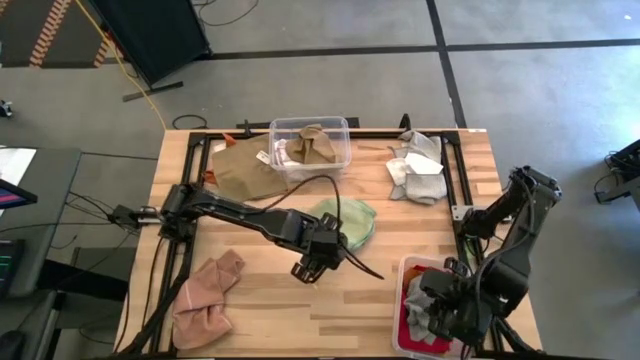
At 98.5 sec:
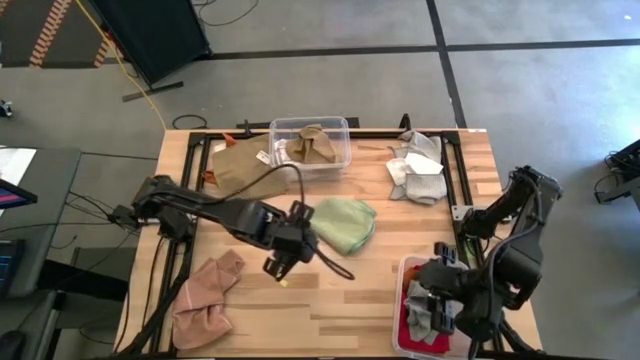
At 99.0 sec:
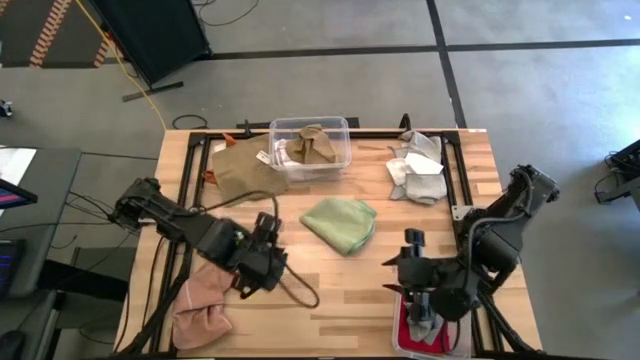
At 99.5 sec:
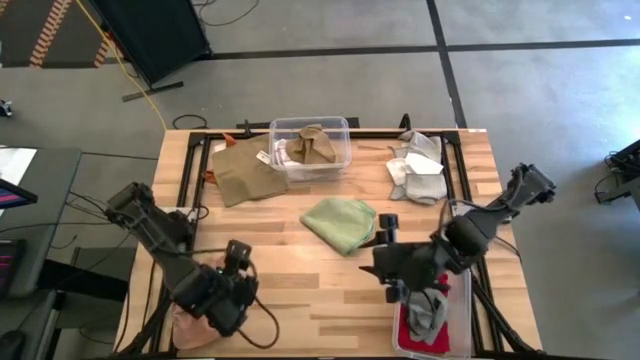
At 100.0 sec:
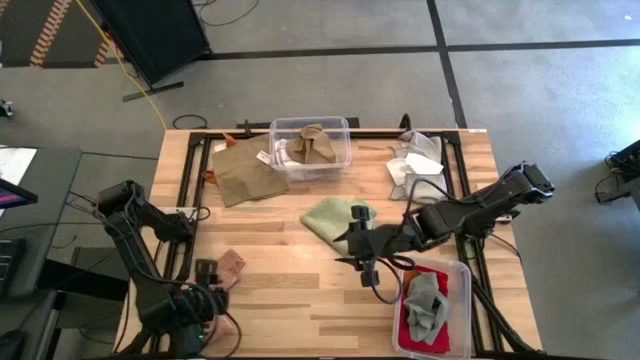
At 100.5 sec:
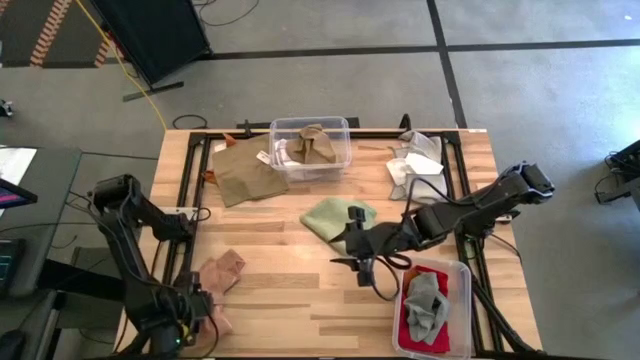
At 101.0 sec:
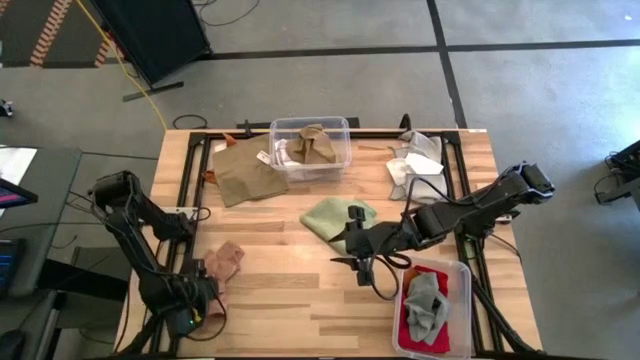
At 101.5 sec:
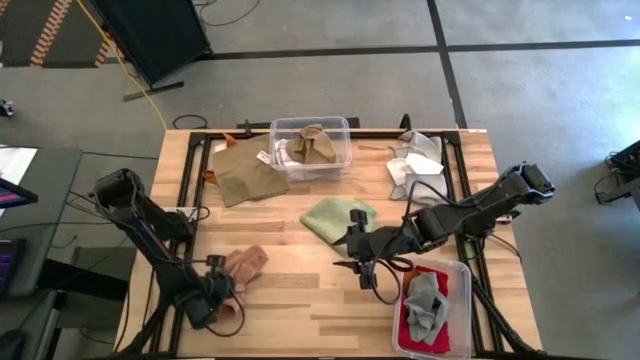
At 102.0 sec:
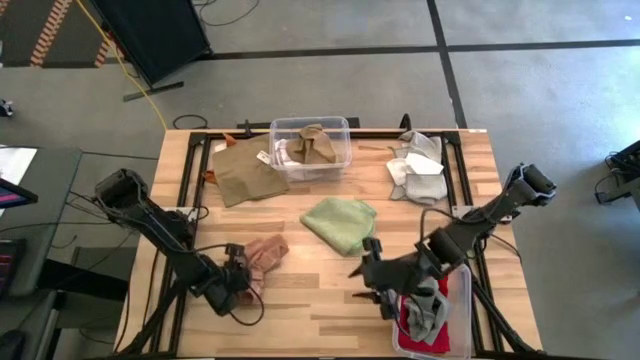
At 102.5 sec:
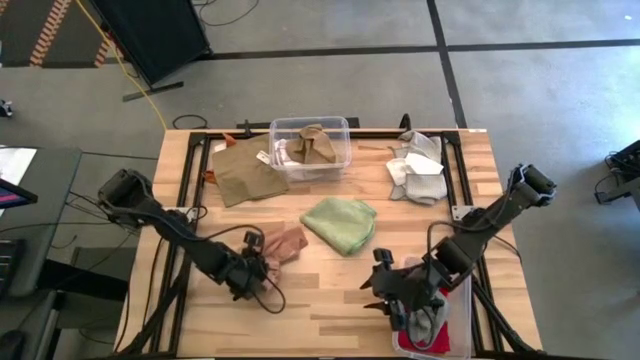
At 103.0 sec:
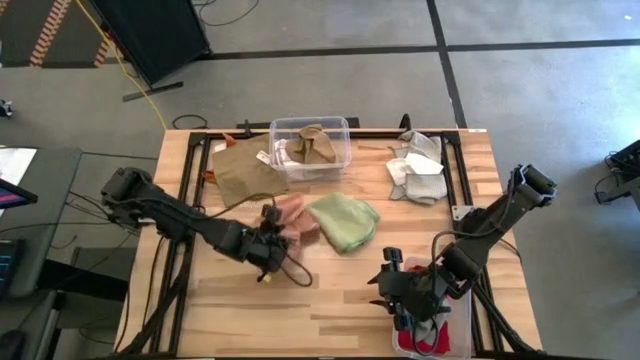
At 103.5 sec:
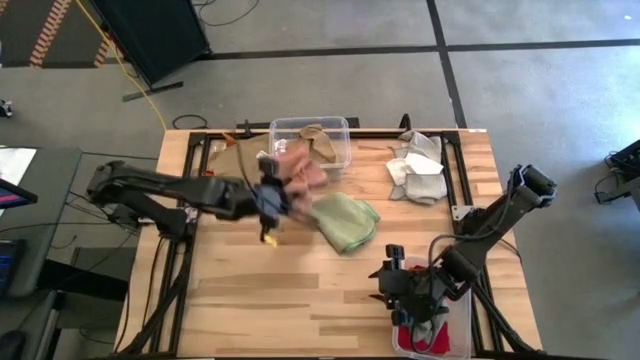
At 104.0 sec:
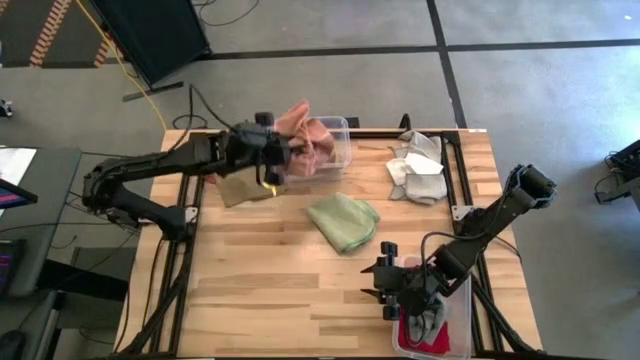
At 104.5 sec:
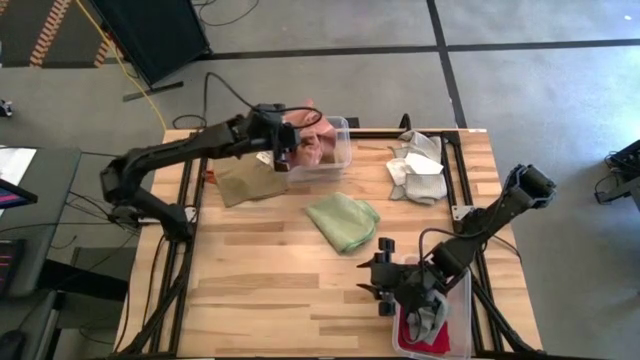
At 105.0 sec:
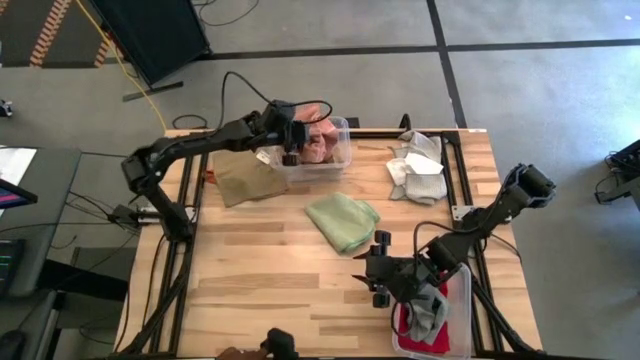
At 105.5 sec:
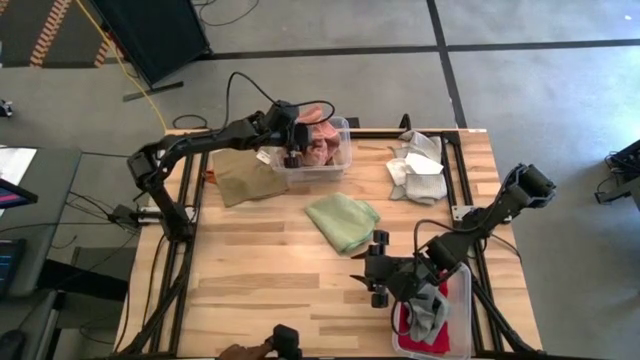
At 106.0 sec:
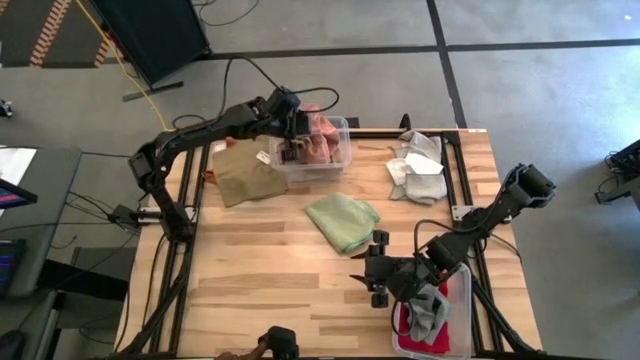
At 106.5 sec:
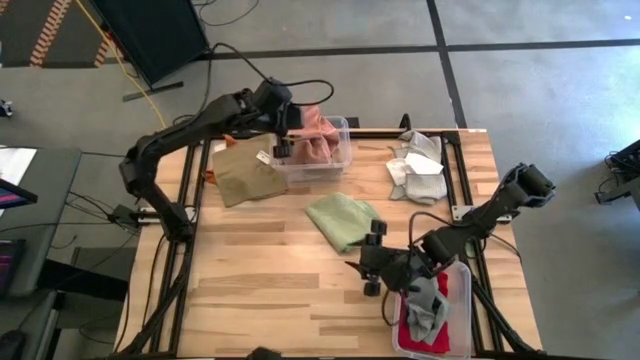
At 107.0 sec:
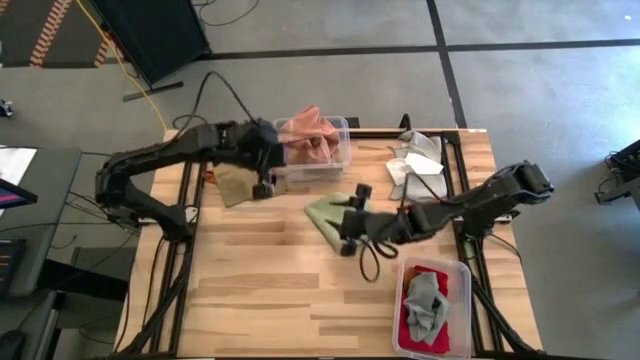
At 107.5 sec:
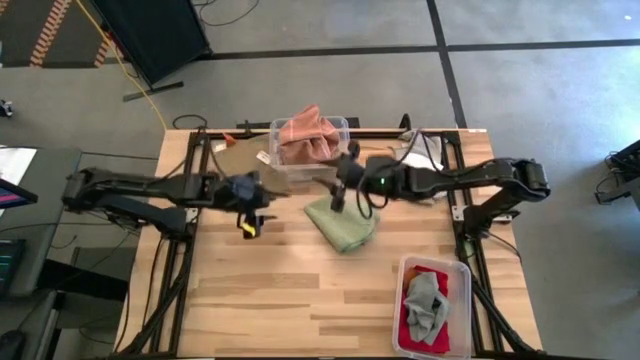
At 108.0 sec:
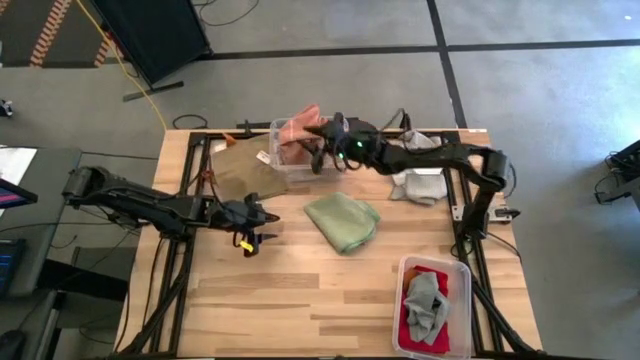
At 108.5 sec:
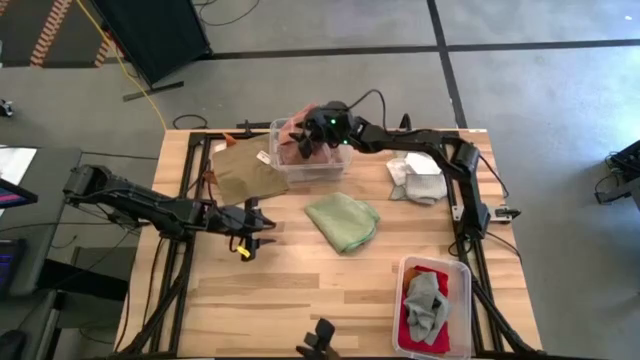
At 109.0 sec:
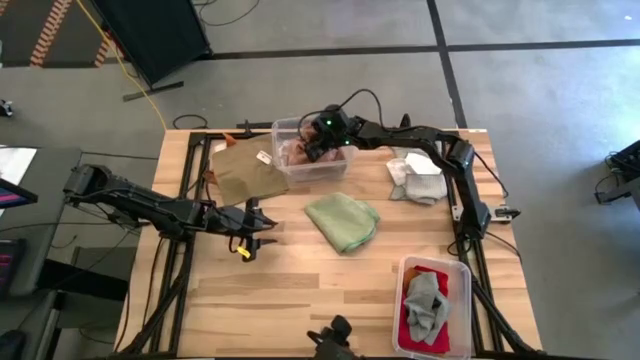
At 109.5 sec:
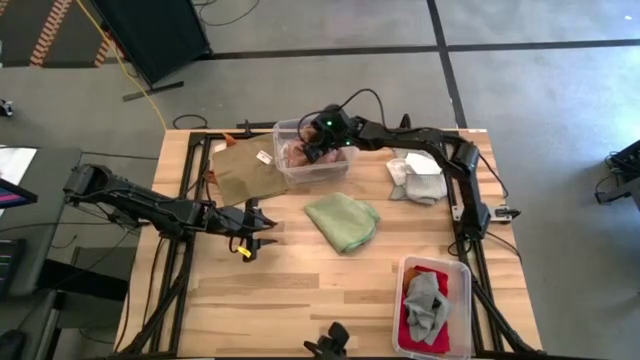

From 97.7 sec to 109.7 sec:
Task: Sort towels by color in basket
Put the light brown towel into the top transparent bin

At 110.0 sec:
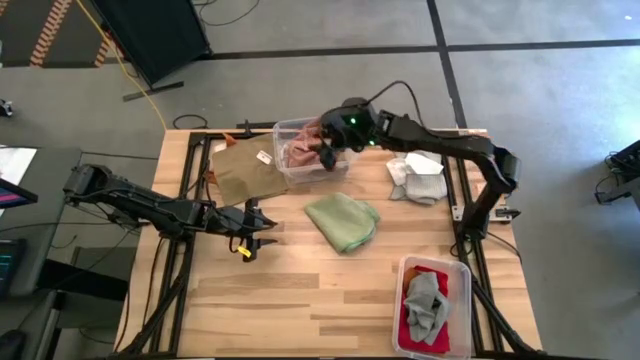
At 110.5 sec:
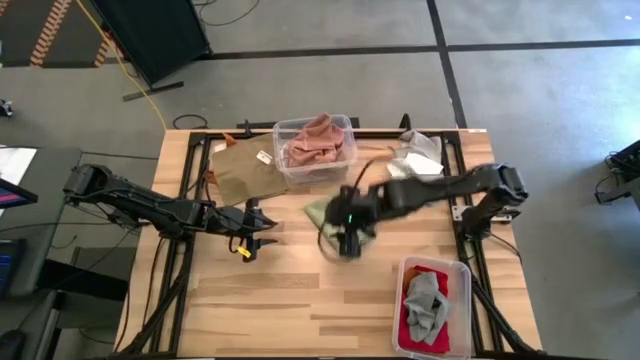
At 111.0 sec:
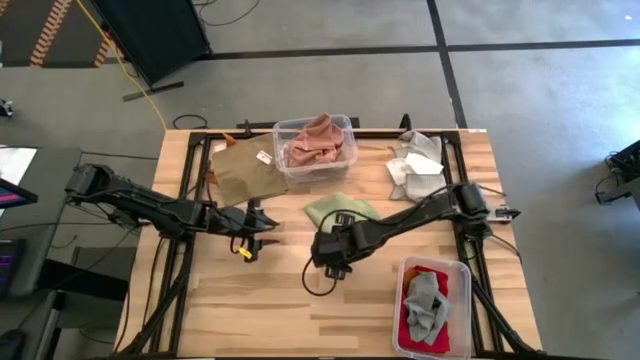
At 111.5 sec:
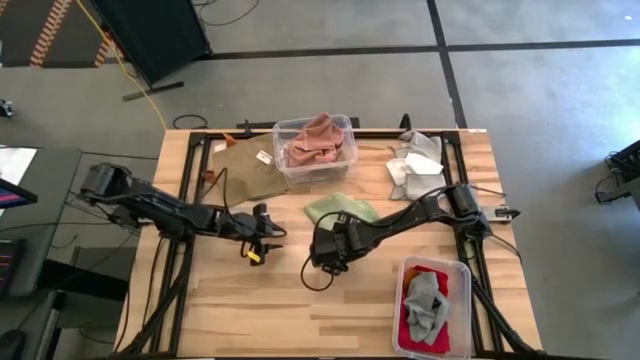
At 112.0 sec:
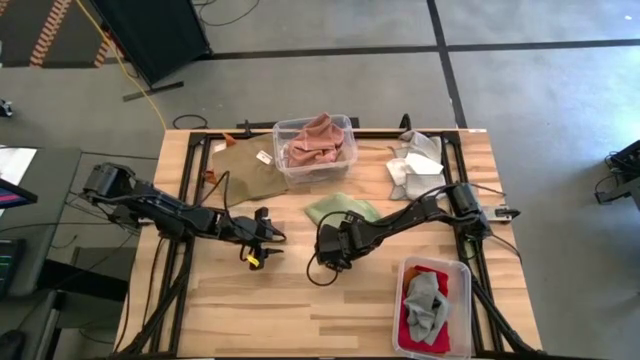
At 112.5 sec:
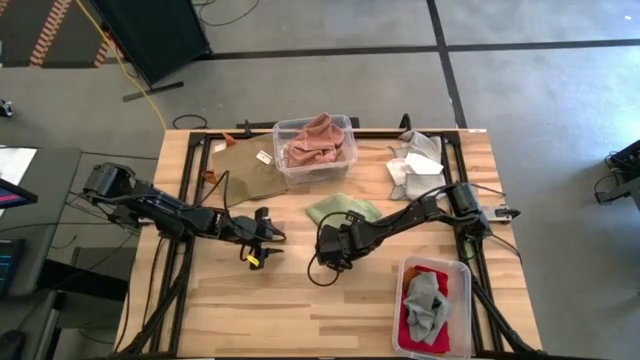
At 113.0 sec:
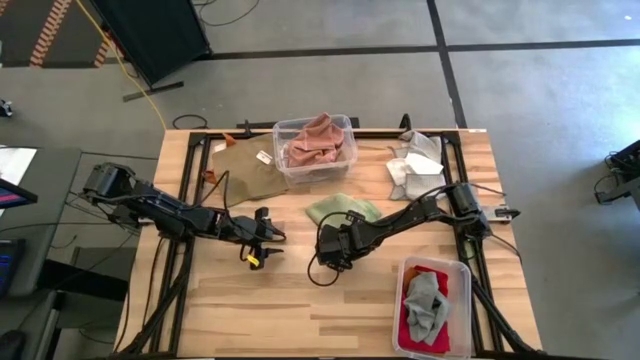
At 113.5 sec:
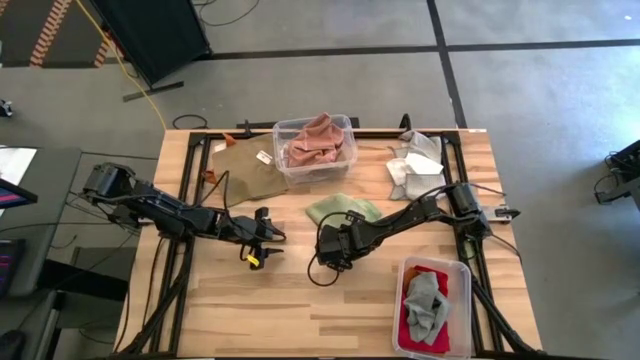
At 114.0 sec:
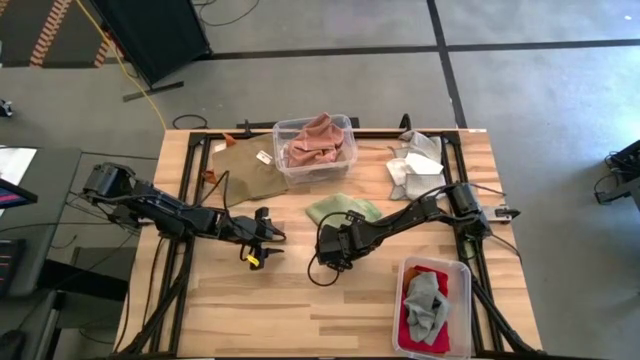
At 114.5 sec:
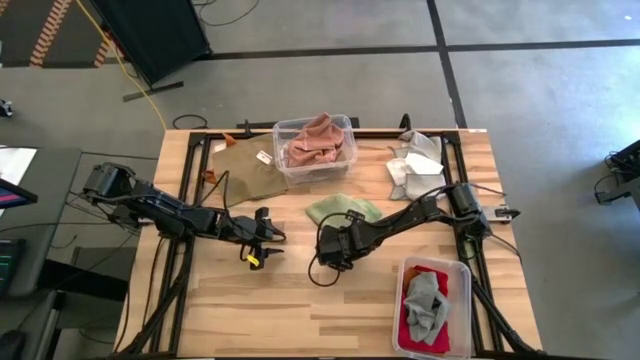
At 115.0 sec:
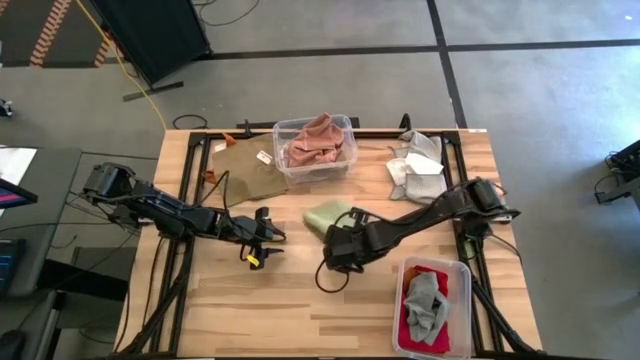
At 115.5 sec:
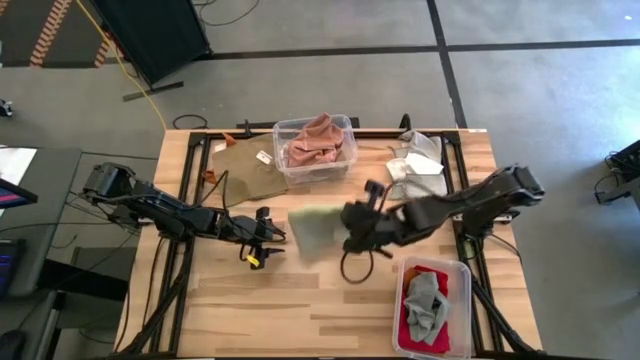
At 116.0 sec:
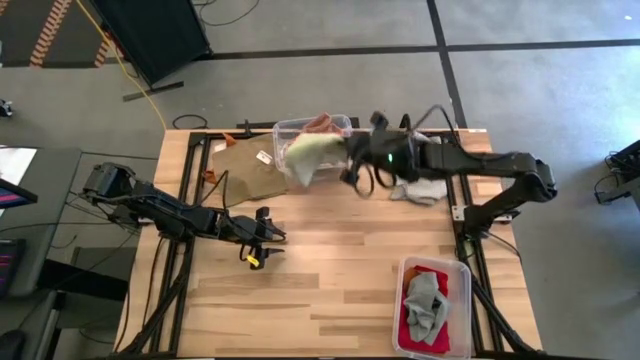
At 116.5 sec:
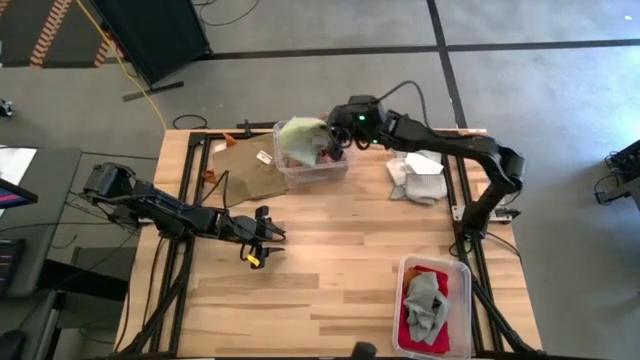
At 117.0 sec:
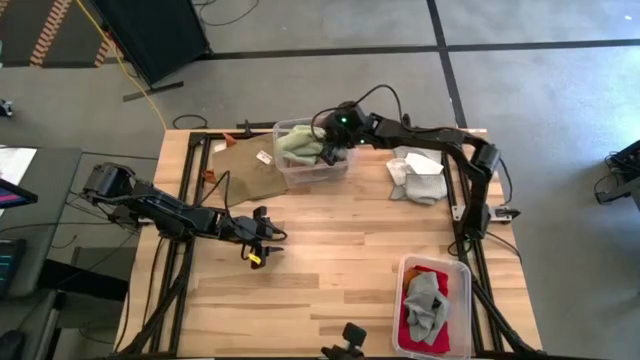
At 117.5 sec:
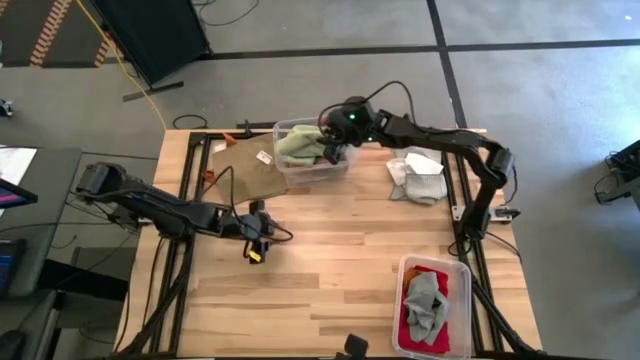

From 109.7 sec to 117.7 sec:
Put the green towel into the top transparent bin

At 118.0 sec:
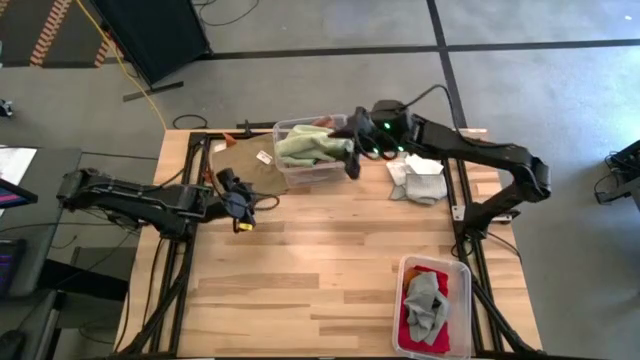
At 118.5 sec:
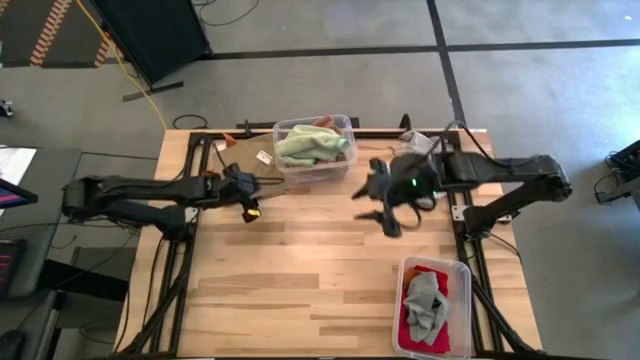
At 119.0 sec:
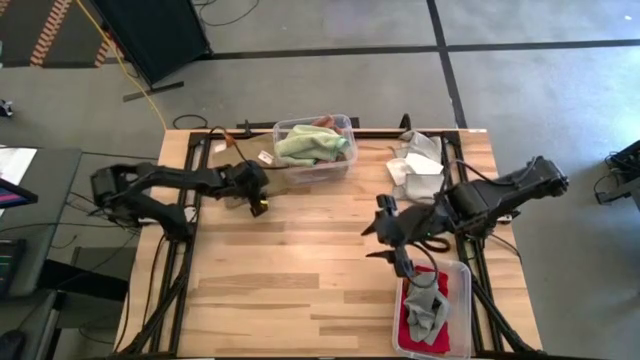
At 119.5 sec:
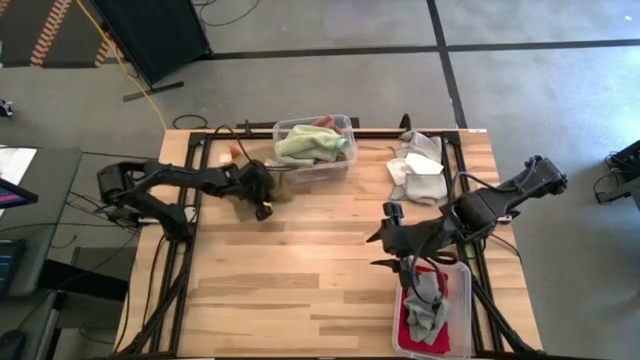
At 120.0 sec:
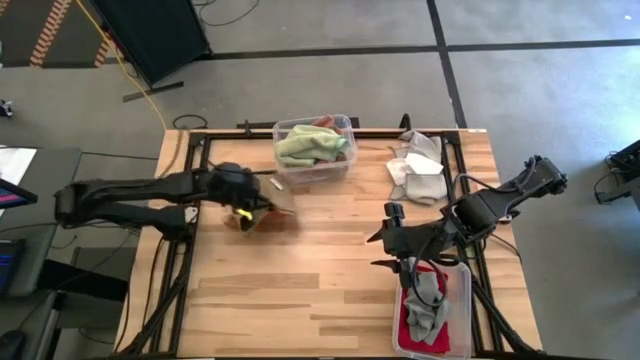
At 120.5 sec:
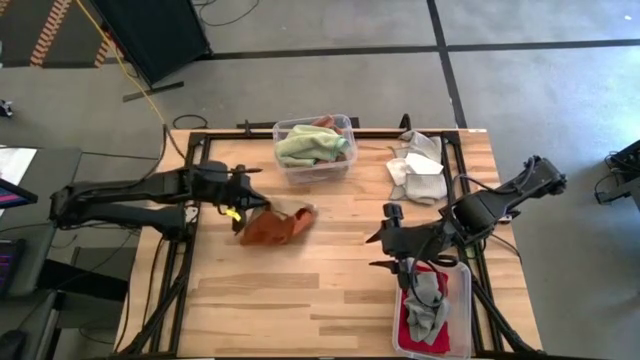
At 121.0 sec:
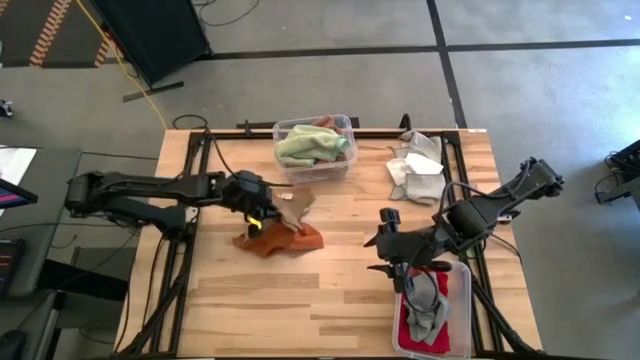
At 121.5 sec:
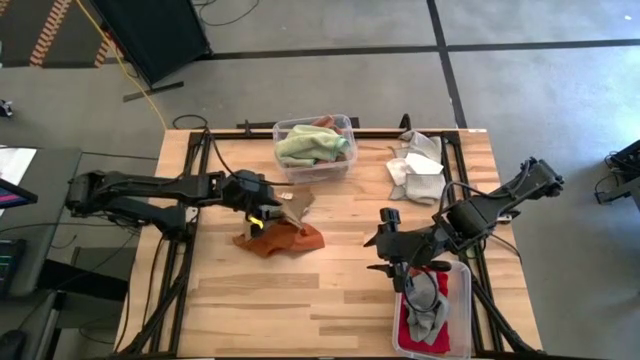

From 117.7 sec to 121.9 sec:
Put the brown towel into the top transparent bin
